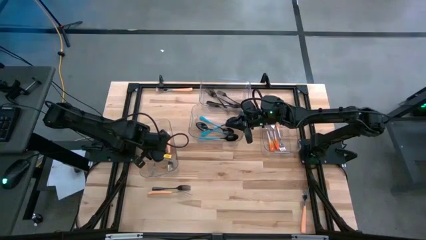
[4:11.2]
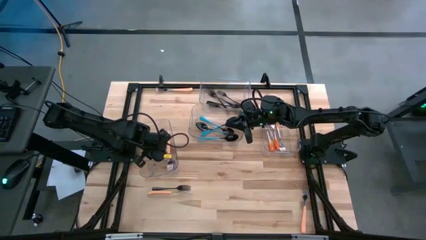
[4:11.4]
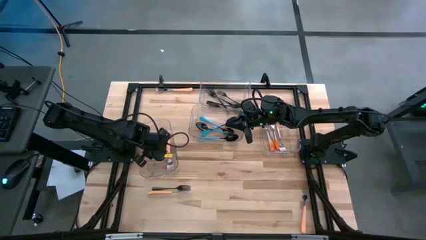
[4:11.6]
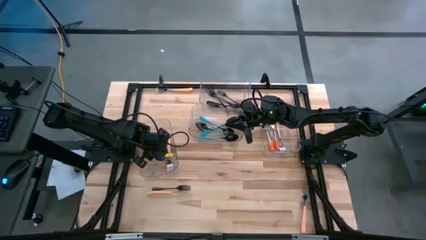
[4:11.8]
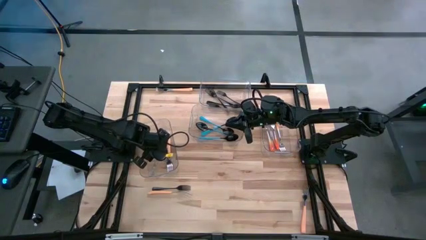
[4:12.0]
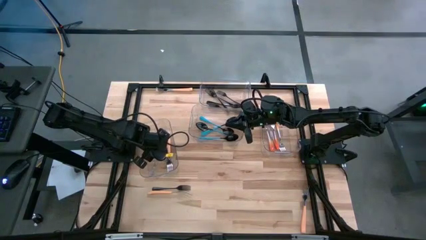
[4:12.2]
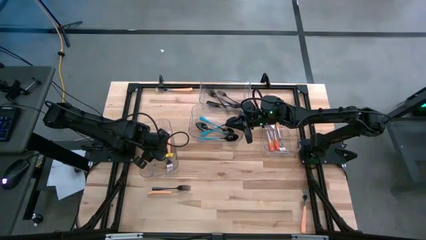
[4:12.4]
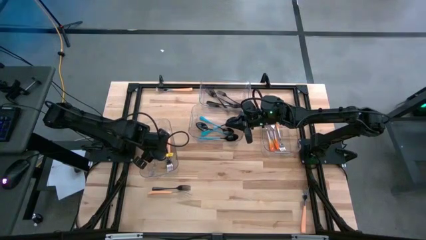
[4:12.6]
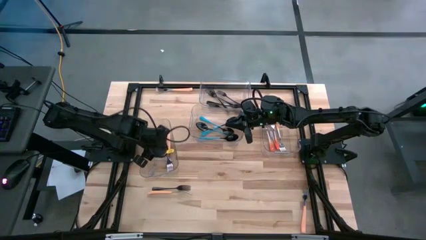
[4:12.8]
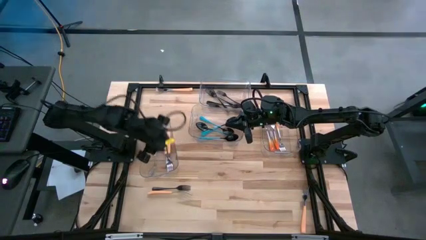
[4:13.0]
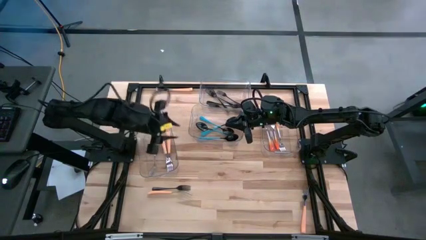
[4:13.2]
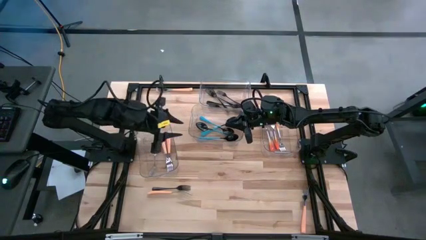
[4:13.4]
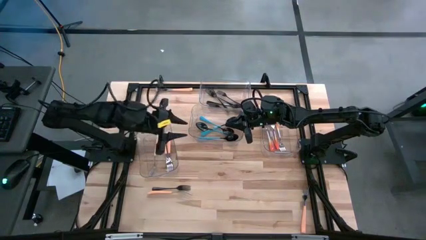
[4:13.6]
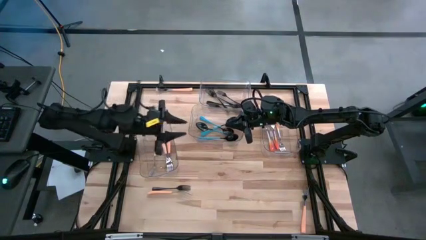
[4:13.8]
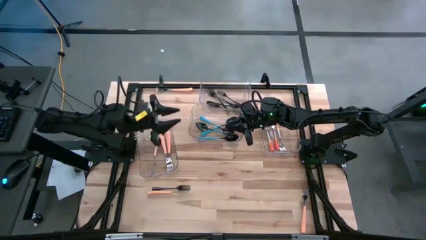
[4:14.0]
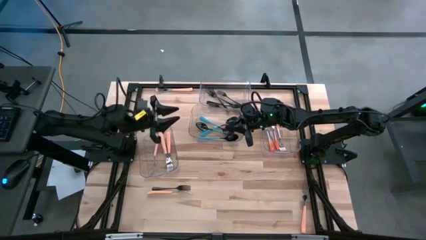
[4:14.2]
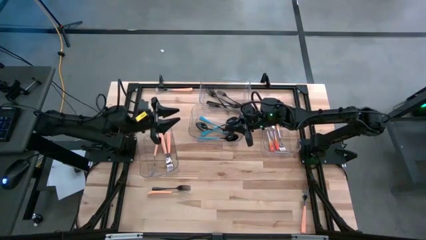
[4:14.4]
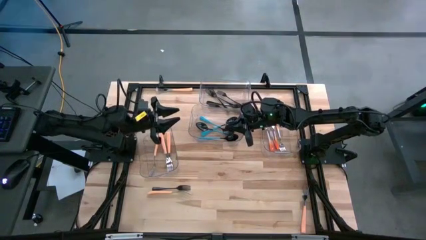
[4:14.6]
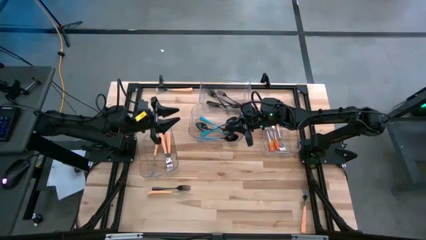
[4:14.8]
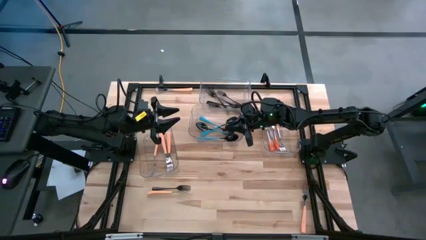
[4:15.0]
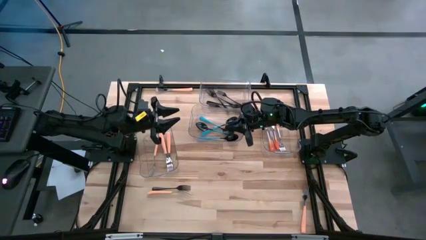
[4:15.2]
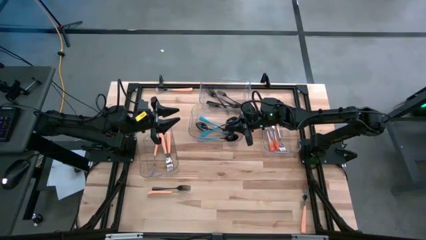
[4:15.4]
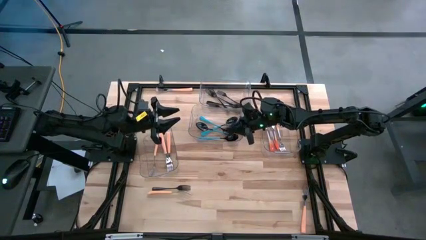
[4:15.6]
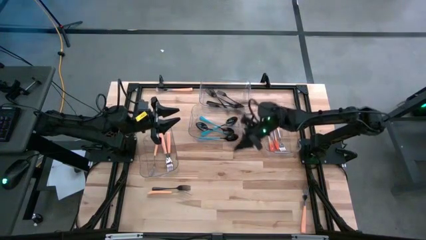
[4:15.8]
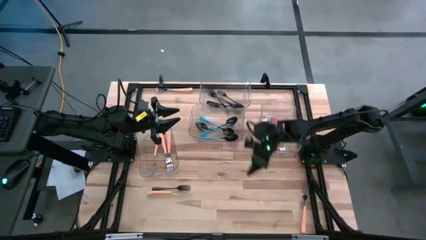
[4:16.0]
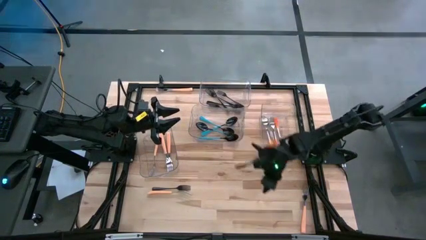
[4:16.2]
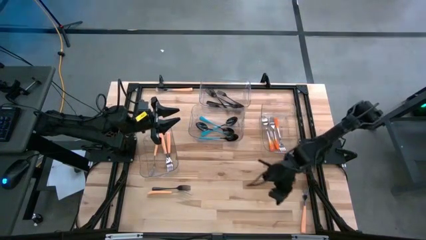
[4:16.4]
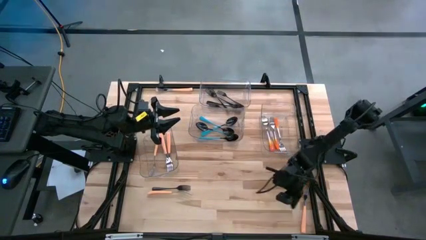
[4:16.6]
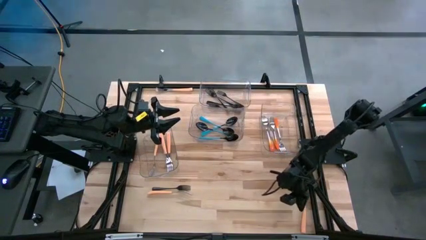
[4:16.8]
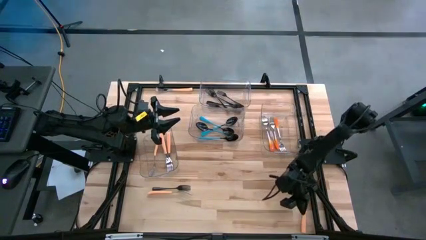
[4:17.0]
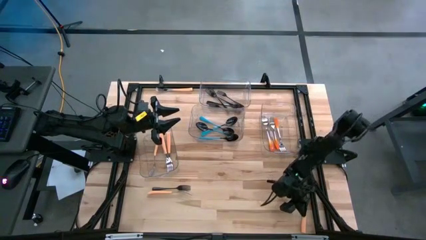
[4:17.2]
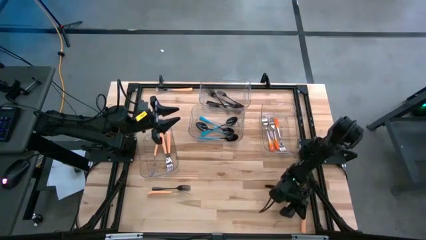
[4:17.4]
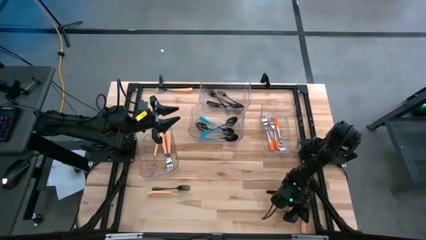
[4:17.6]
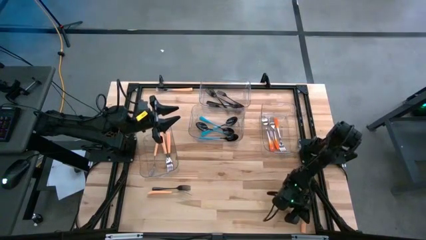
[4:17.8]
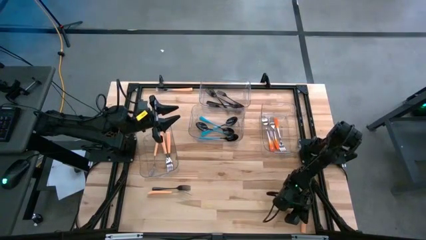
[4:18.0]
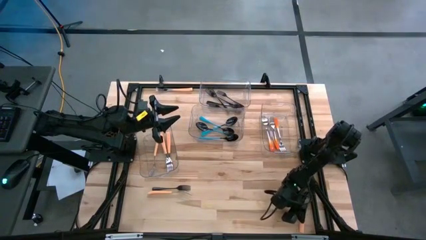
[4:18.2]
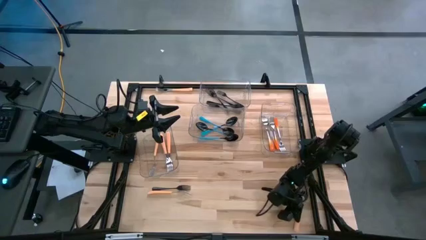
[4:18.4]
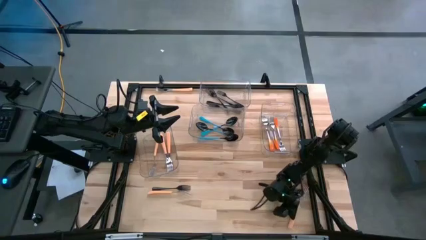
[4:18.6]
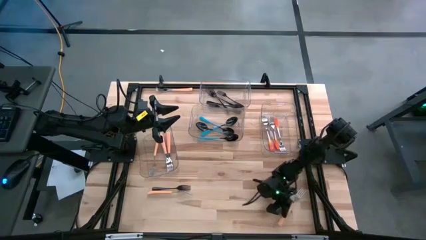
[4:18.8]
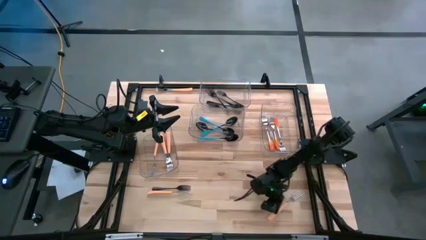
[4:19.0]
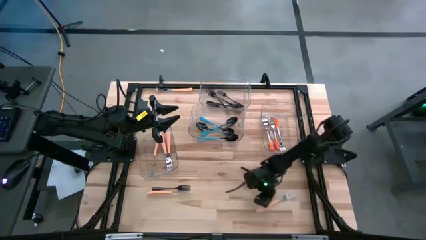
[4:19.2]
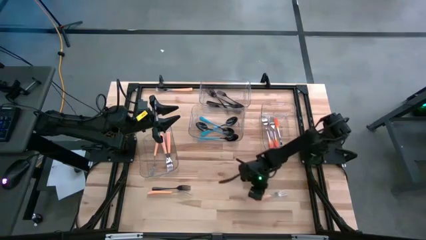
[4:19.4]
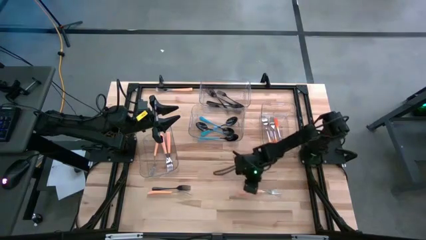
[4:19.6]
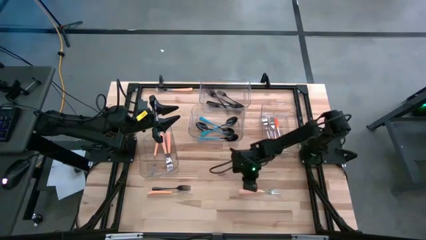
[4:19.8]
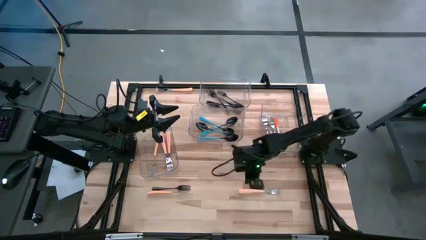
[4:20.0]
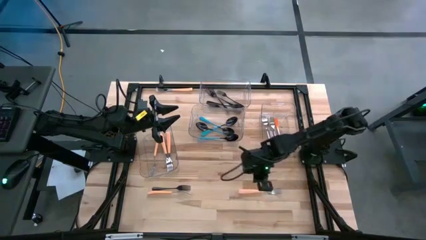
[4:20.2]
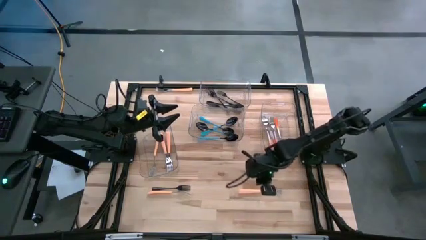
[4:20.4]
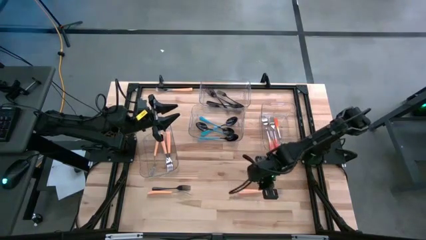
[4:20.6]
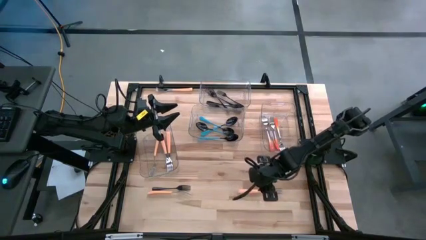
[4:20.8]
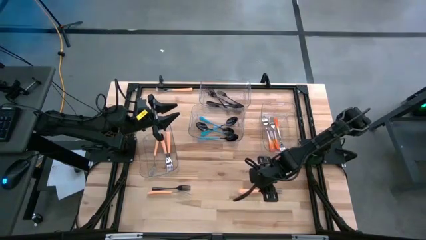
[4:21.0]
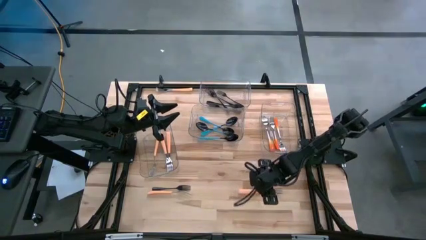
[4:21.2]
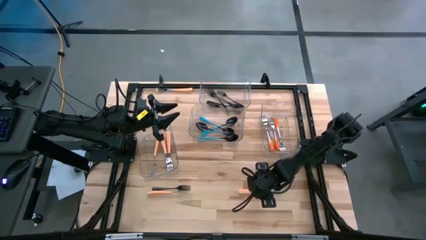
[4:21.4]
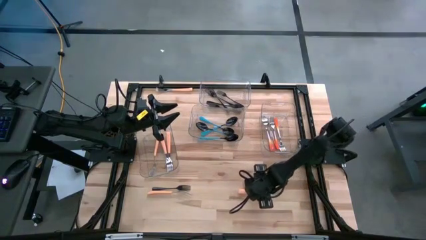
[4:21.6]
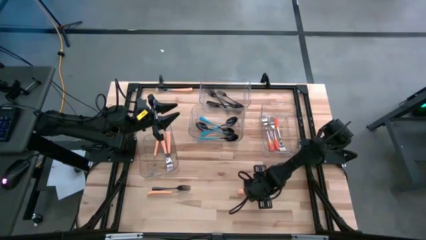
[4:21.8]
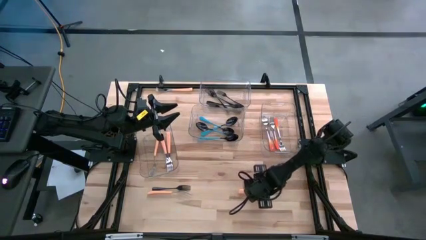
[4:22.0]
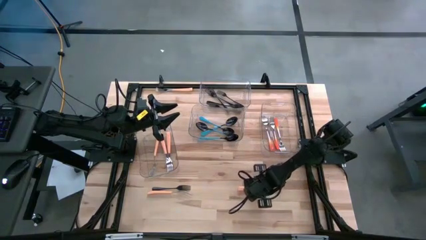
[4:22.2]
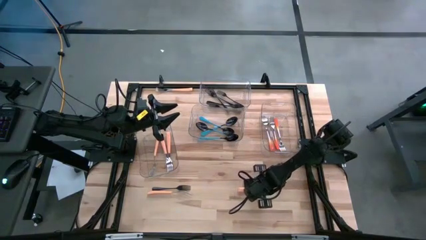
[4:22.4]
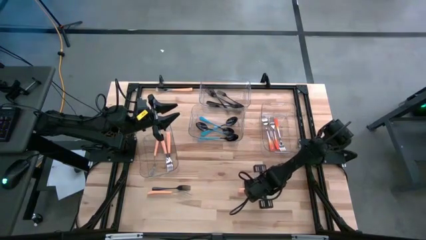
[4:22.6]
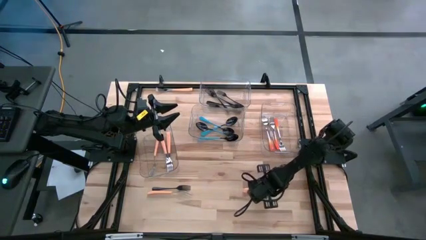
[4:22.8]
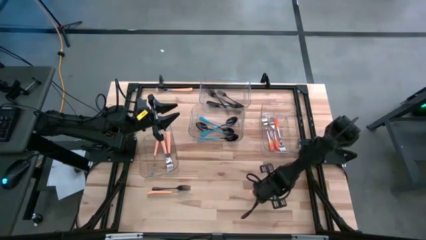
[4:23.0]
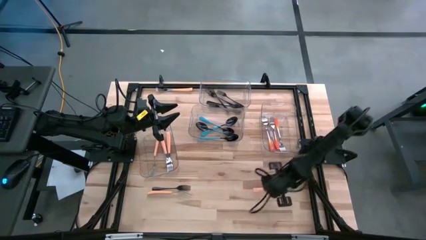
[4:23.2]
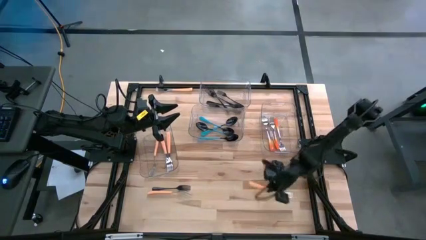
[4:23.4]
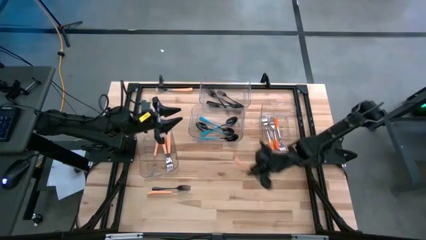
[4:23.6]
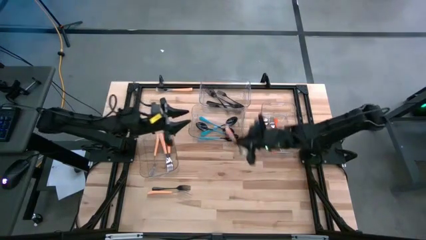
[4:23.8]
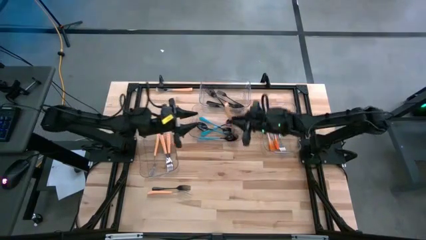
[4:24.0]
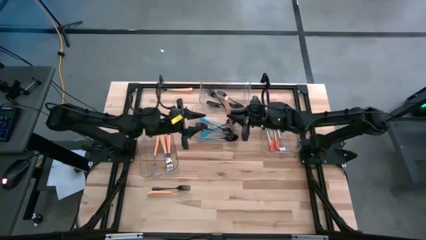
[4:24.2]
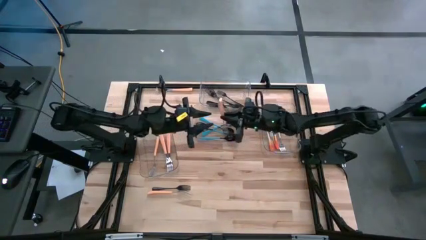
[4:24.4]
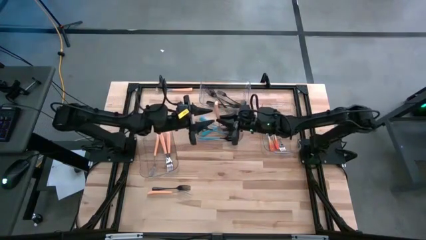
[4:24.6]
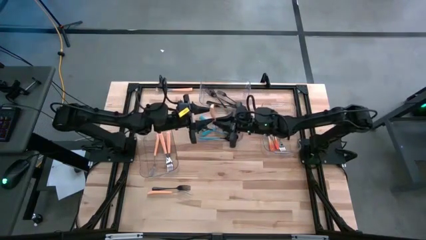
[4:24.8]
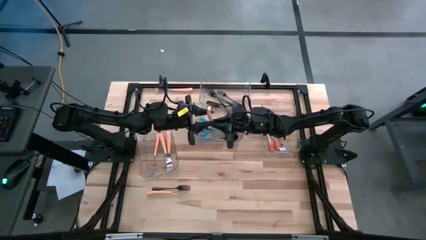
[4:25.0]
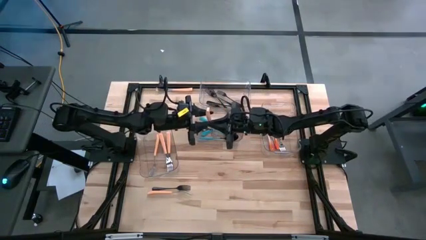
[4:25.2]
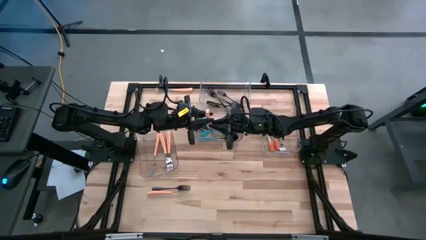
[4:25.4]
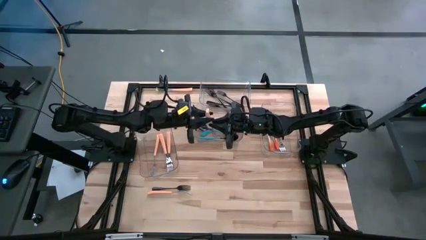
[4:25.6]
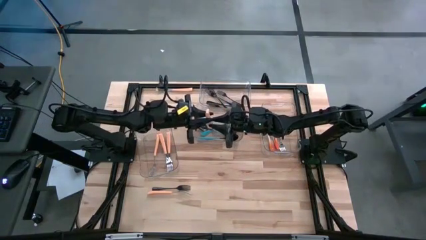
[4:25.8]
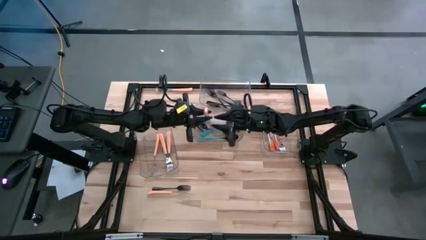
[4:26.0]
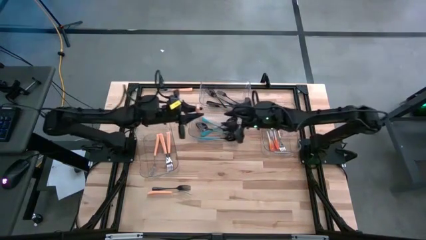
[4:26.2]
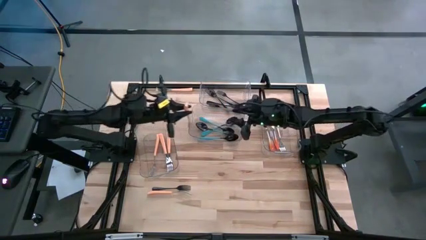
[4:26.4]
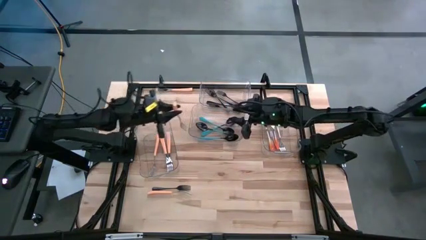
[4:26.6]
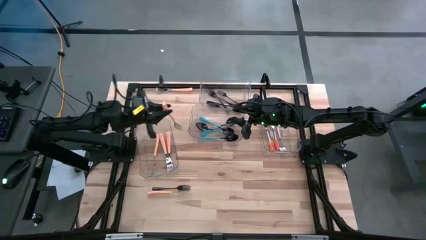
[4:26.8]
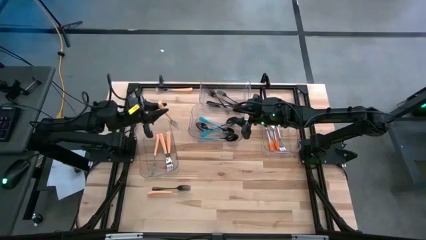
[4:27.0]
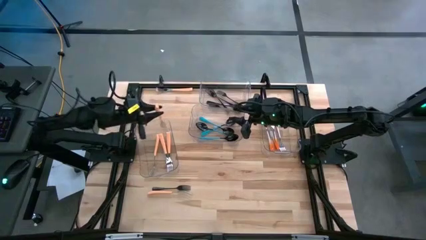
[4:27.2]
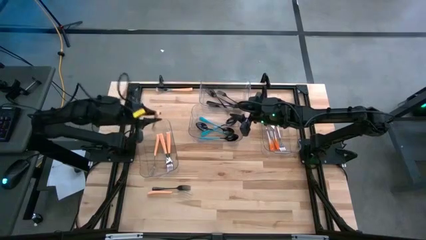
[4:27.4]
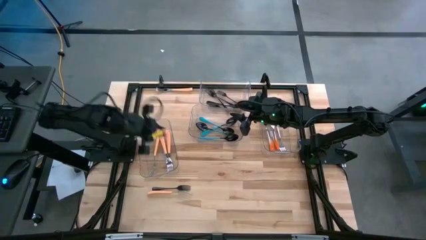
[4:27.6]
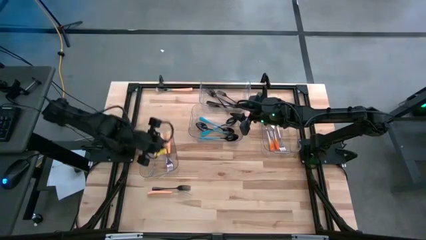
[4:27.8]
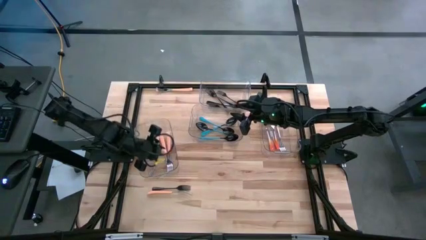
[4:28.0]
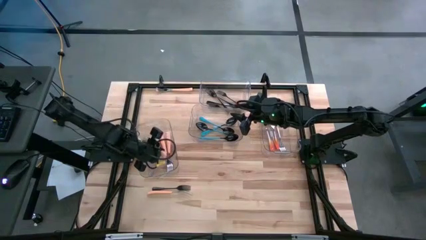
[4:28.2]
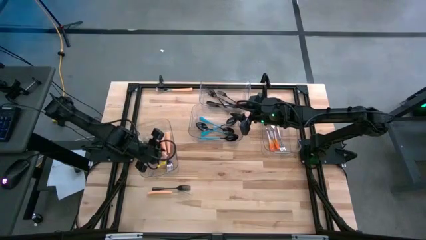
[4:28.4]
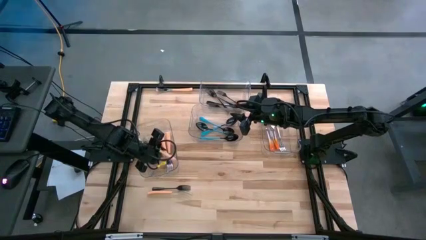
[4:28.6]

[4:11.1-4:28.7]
Task: Sort silverware by color (type)
Put the light orange fork into the bottom left transparent bin
